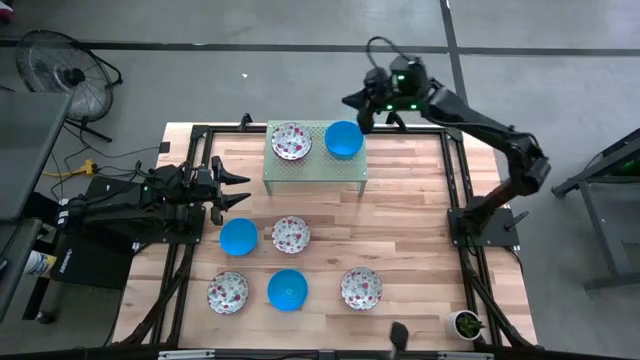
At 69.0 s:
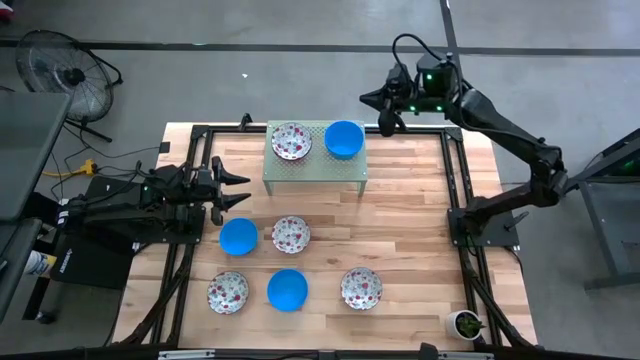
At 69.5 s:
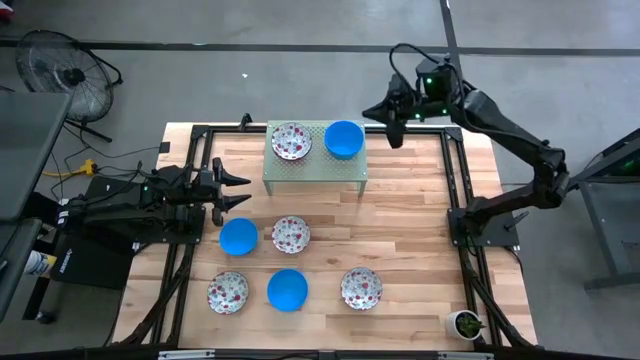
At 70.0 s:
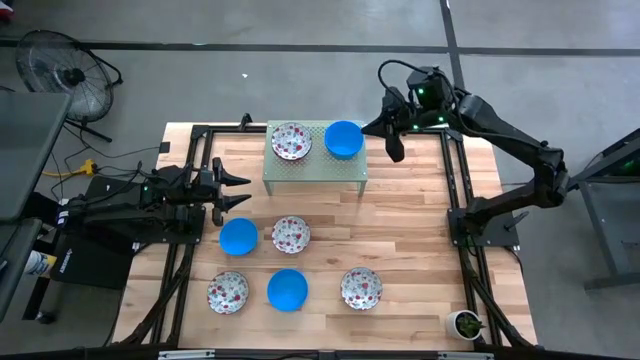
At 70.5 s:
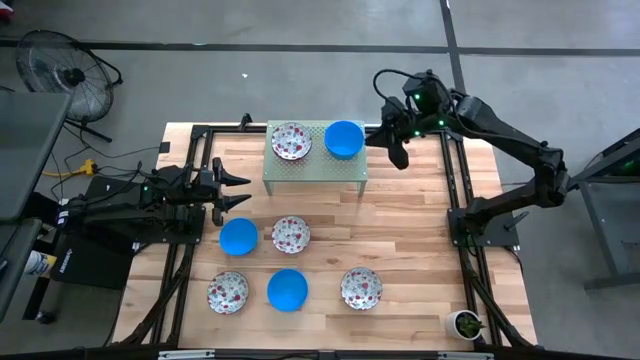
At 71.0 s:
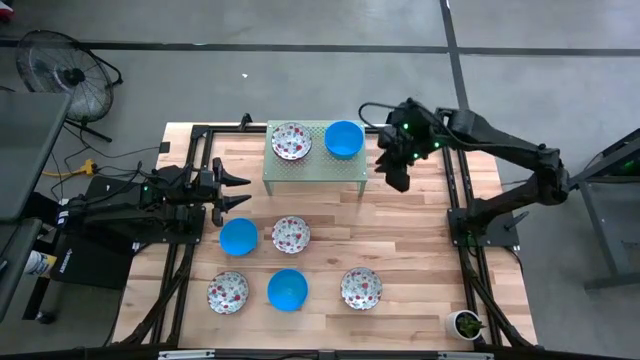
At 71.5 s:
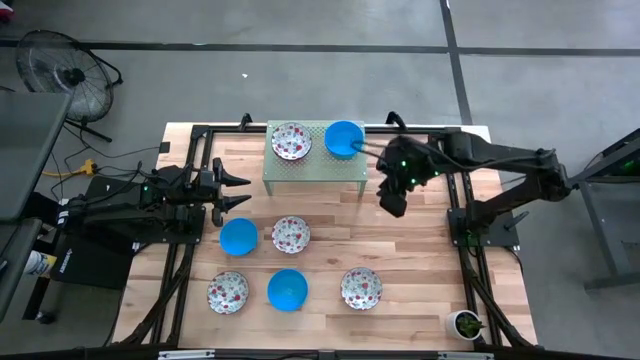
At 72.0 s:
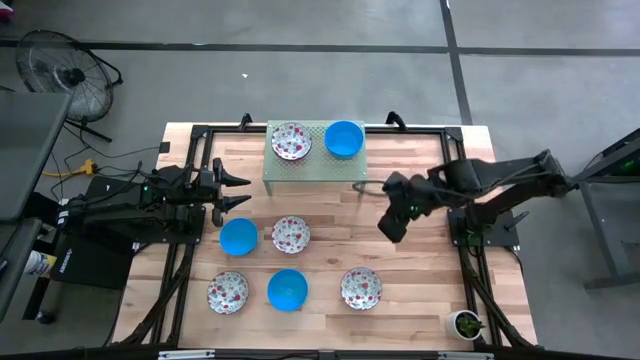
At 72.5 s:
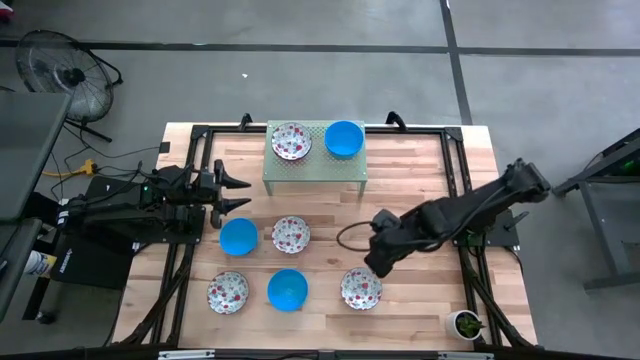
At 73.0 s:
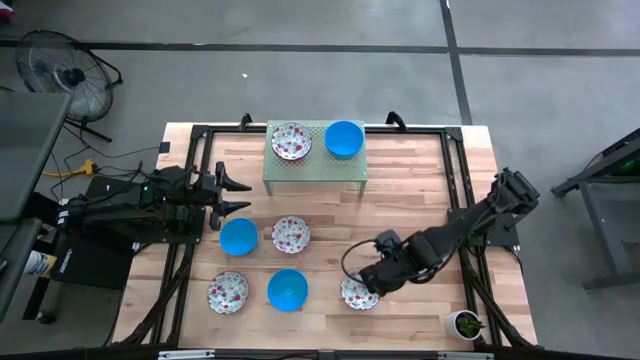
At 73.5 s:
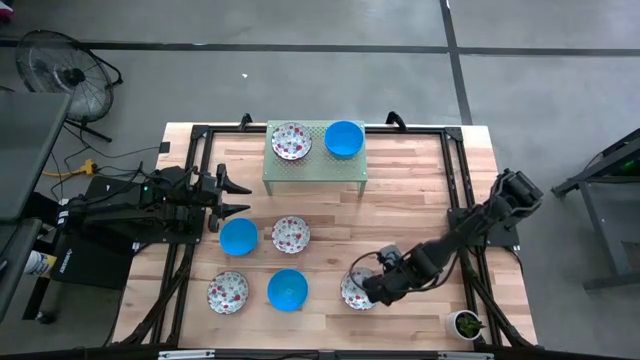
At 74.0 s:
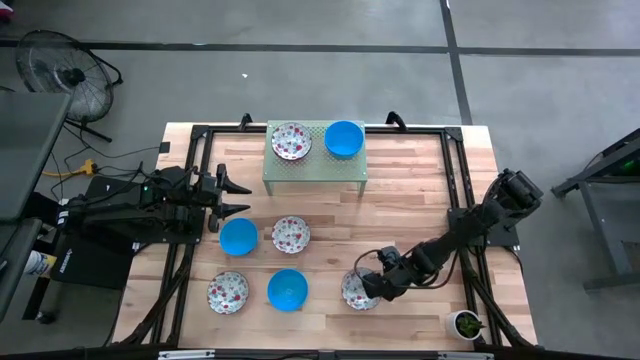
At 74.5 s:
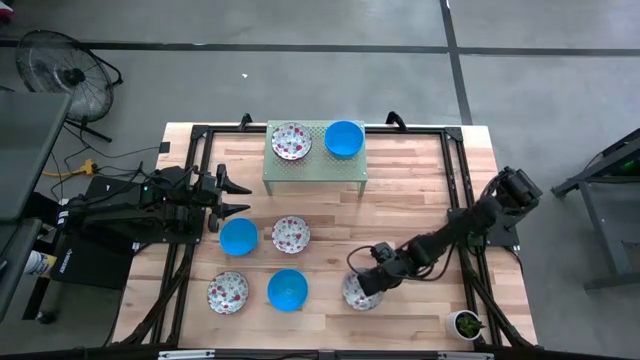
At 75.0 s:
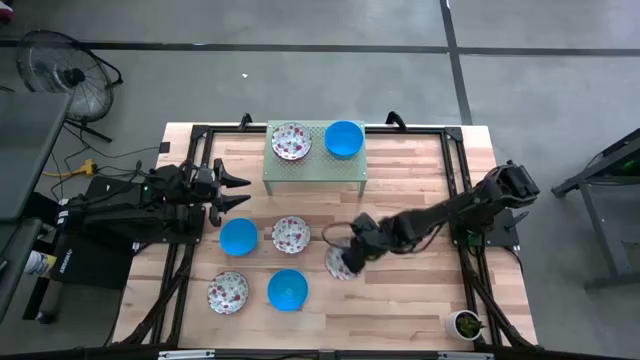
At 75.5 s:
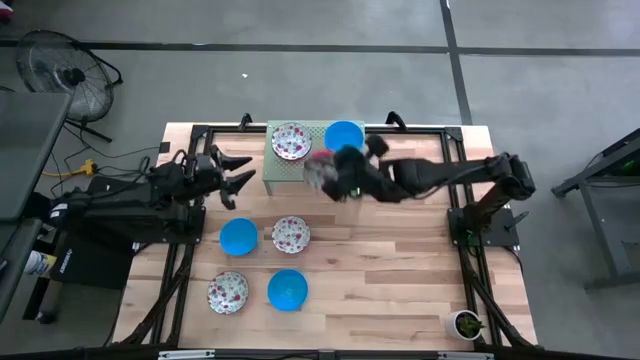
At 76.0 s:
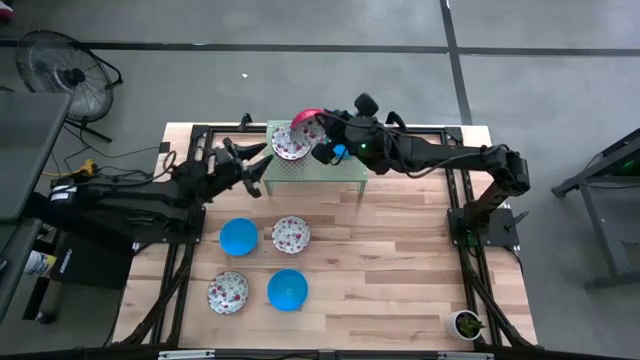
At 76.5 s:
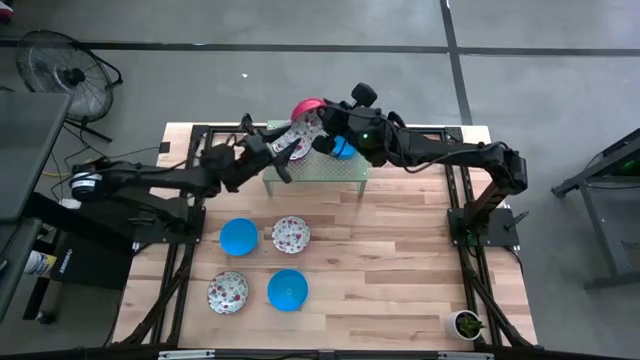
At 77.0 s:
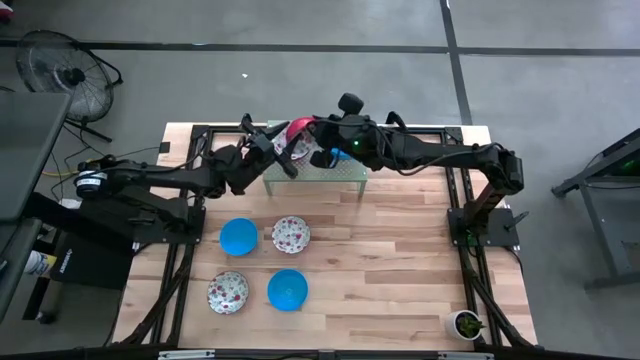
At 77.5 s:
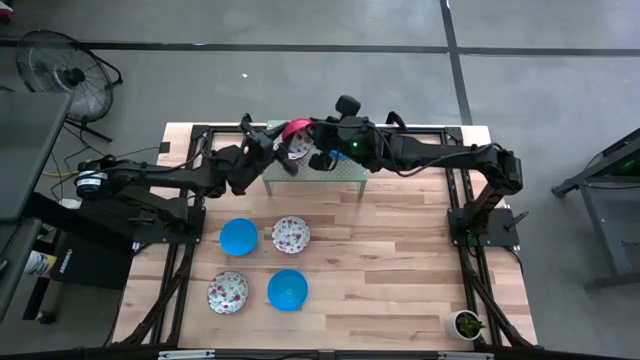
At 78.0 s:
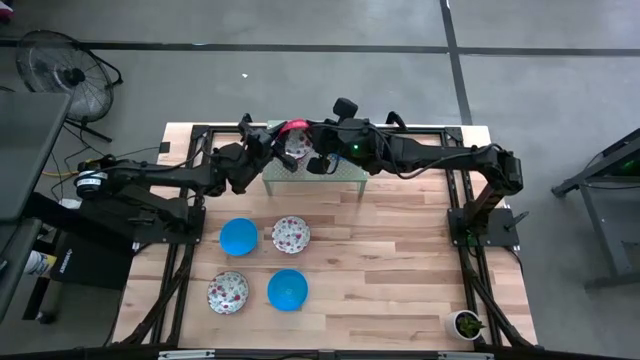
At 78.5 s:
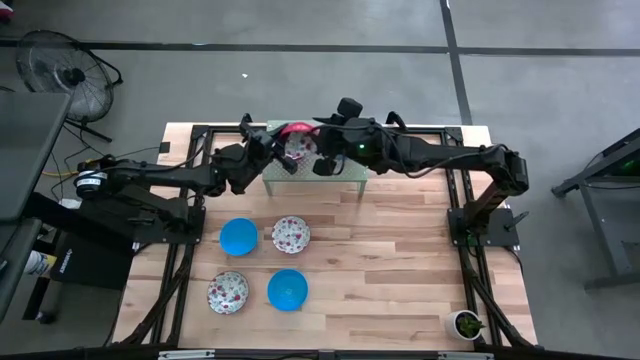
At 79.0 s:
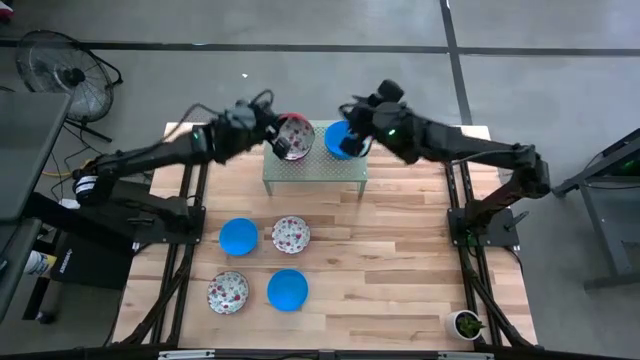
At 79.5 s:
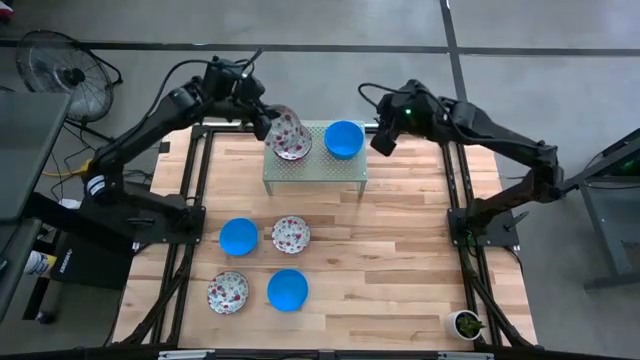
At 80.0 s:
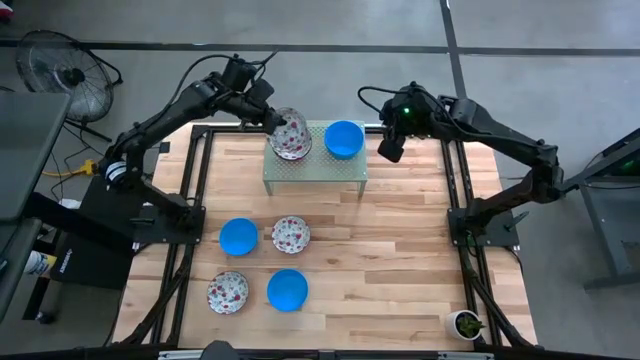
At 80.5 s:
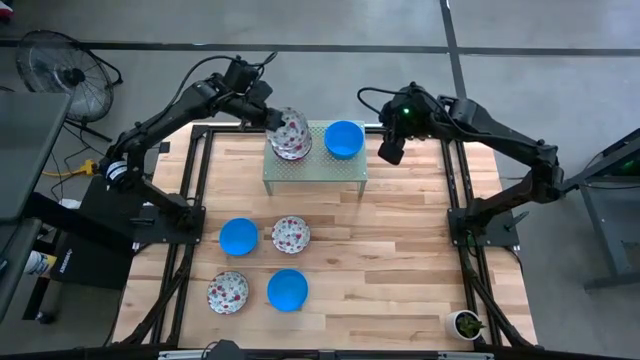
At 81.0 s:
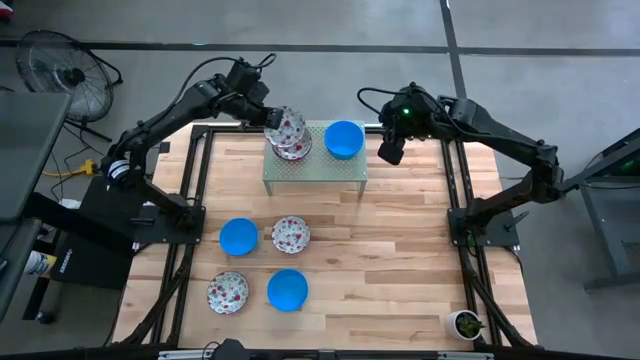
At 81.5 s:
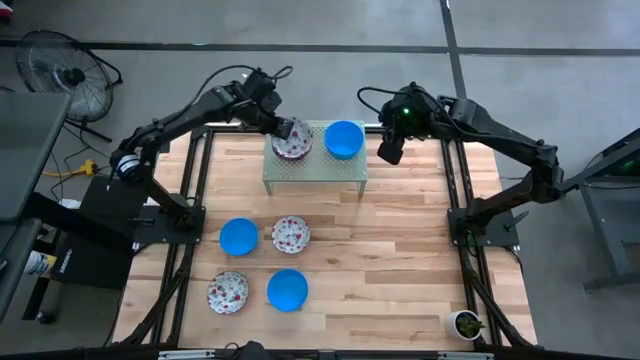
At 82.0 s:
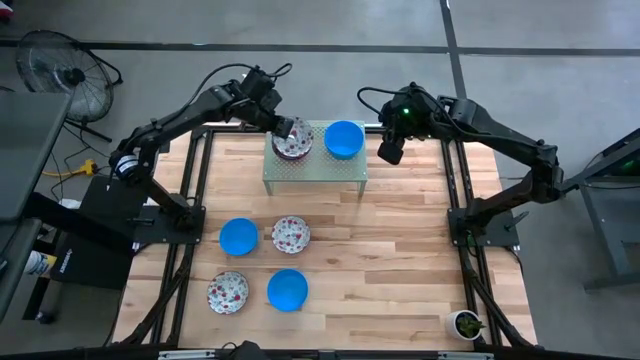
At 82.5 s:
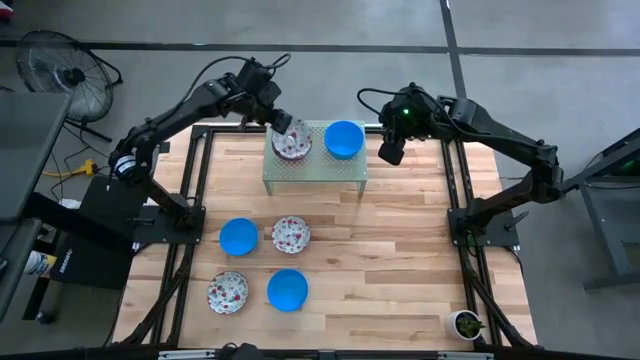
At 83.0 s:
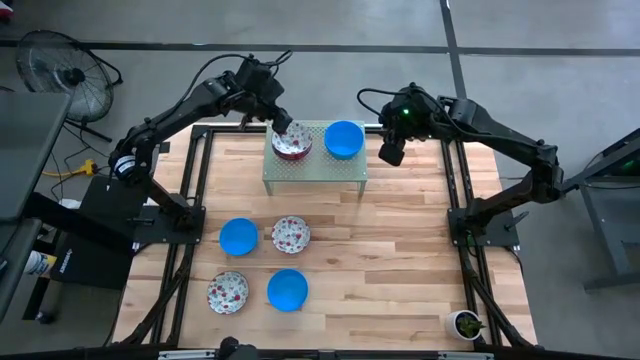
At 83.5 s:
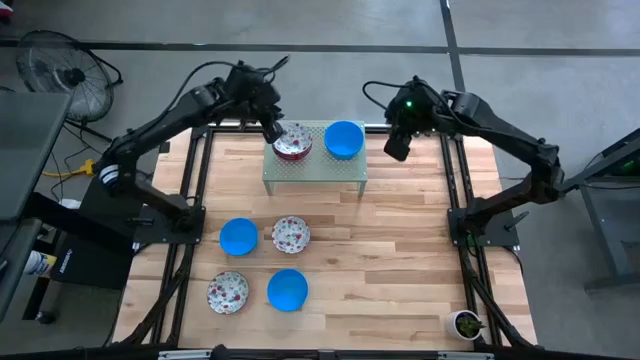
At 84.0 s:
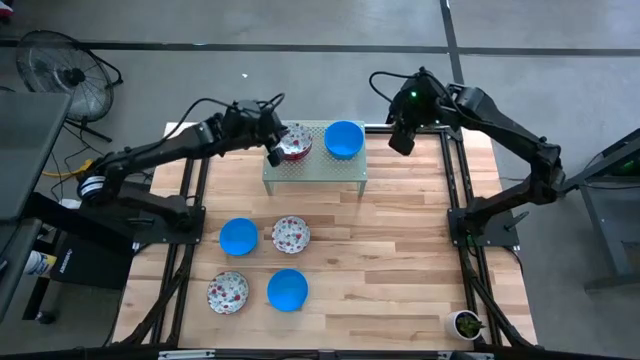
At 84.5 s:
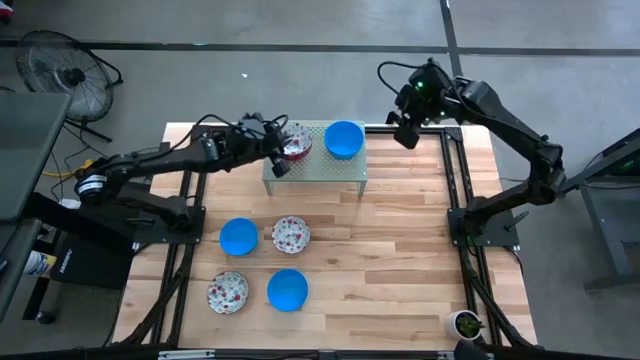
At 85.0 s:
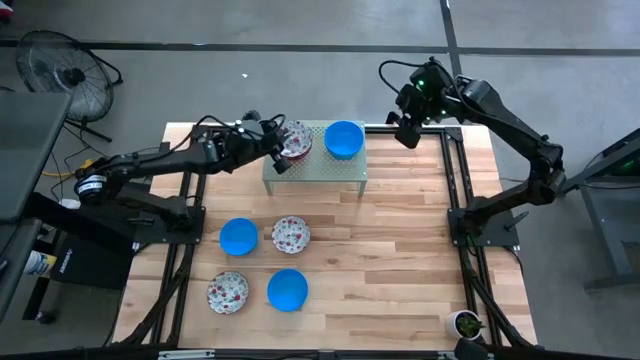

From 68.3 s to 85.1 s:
Task: Pick & Place Mini bowls
Stack the white and red bowl on top of the stacked white and red bowls on the shelf

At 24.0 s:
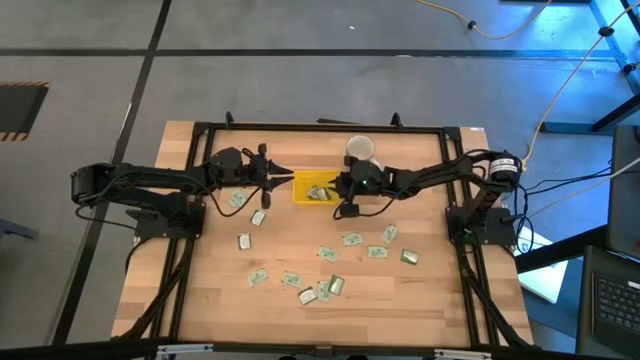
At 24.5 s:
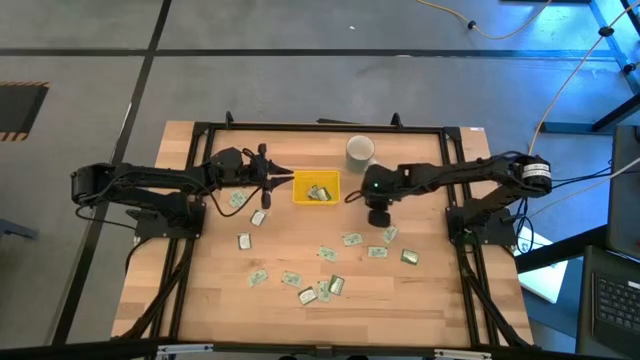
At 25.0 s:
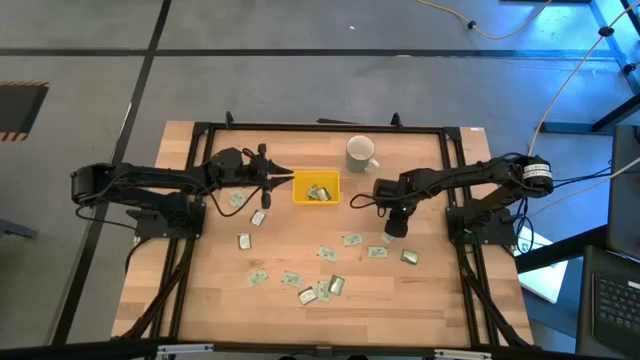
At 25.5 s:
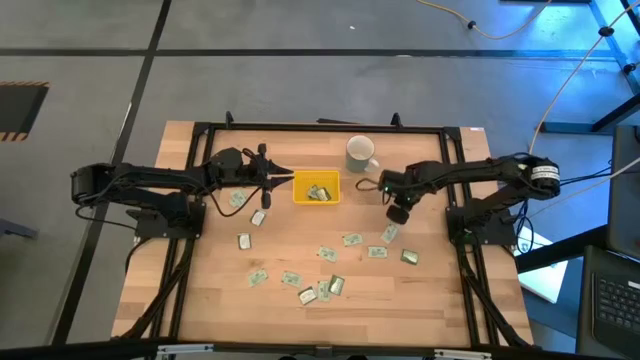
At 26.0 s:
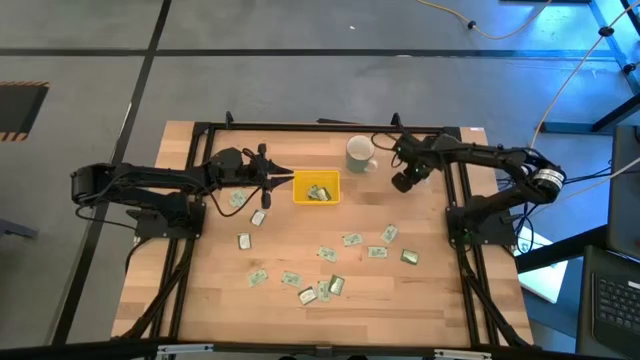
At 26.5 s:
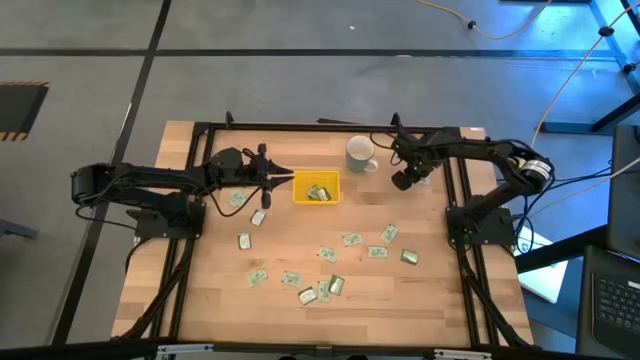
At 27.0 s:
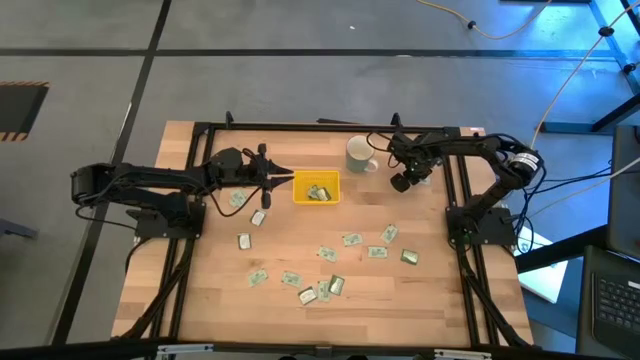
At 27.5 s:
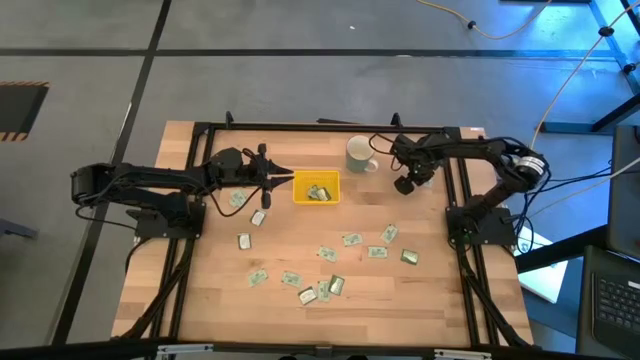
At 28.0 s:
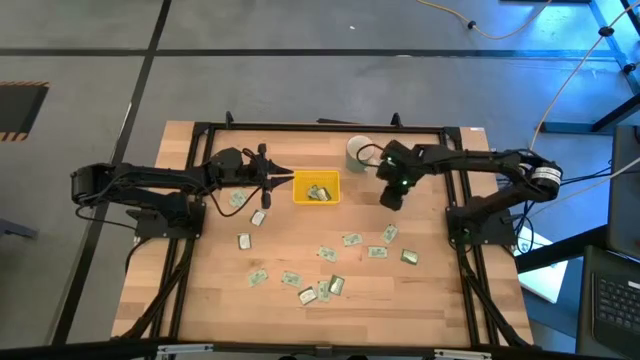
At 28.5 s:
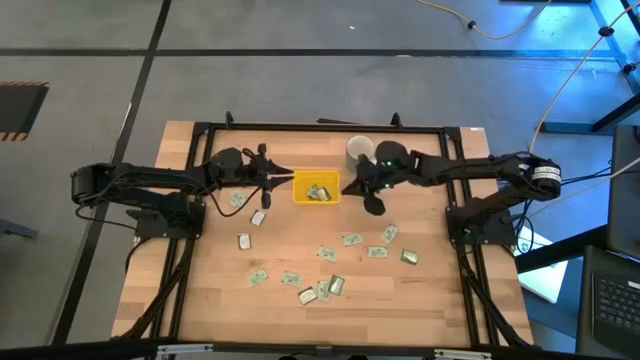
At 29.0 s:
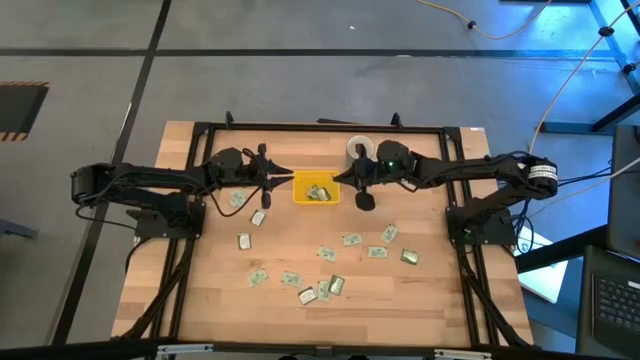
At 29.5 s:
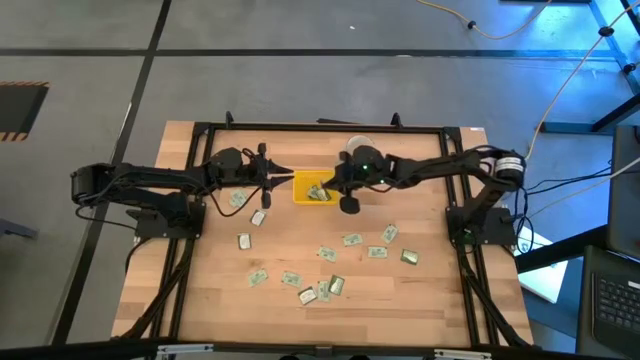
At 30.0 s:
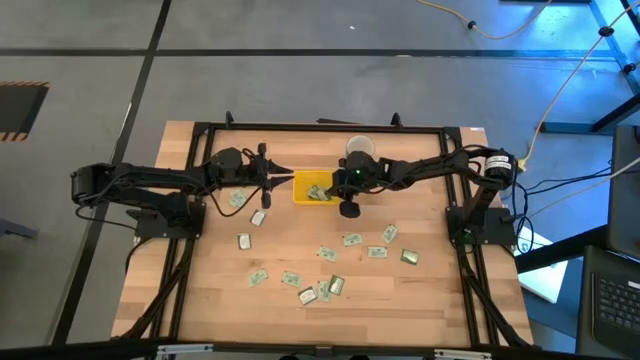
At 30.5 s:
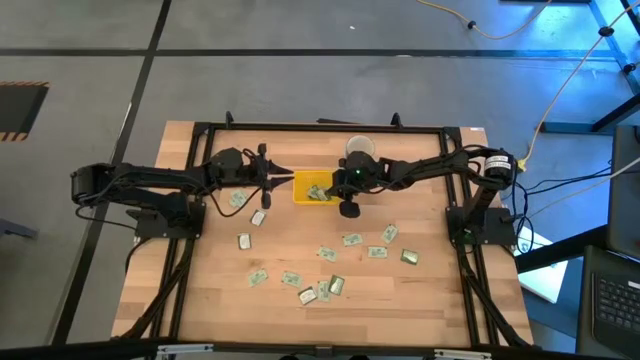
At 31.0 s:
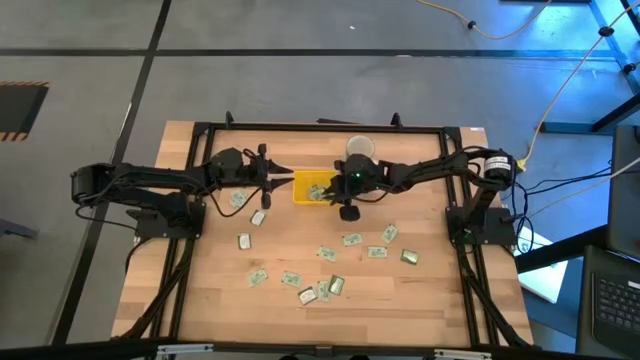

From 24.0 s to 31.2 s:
Task: Pick and place Stevia / Truvia into bins
Put the top right stevia tea packet into the yellow bin
